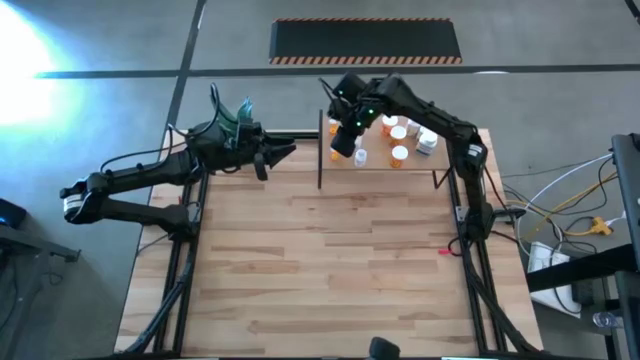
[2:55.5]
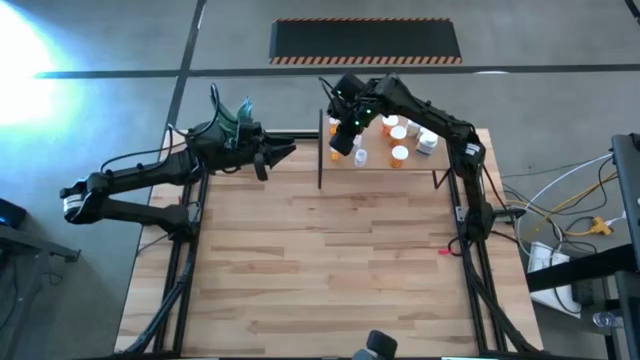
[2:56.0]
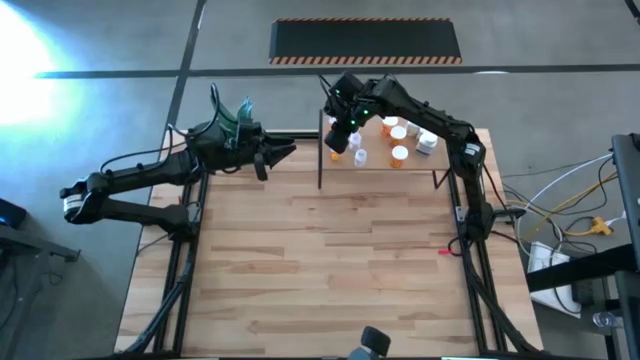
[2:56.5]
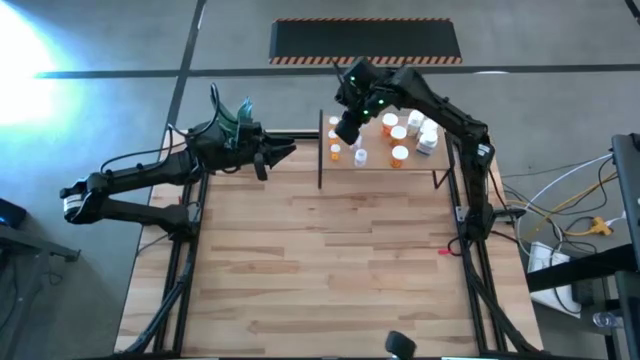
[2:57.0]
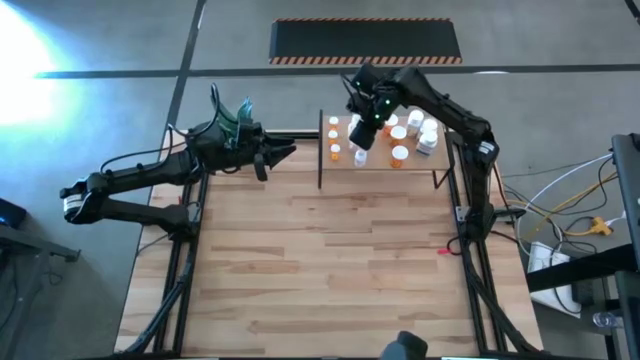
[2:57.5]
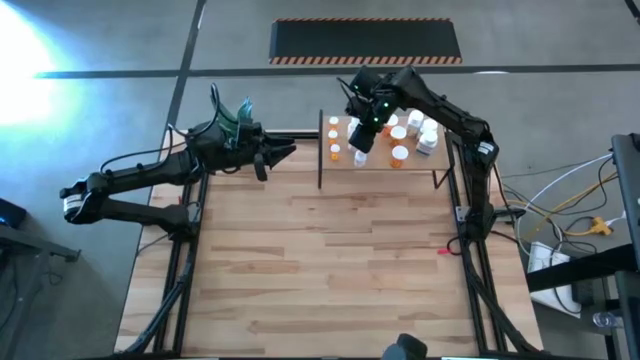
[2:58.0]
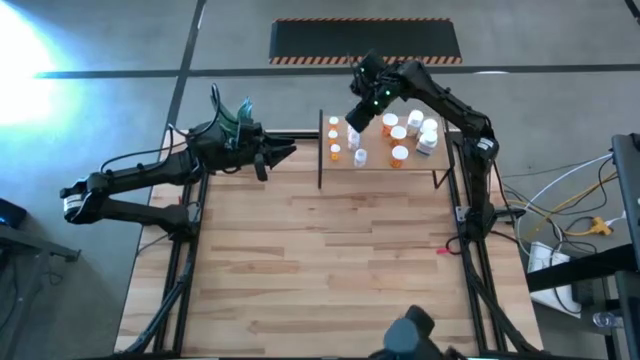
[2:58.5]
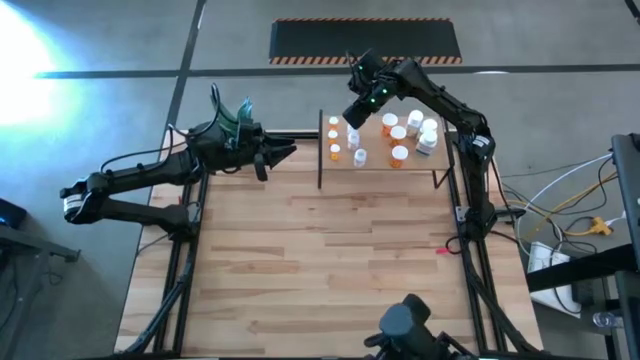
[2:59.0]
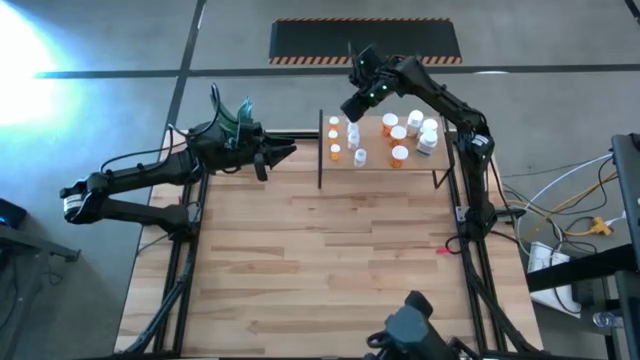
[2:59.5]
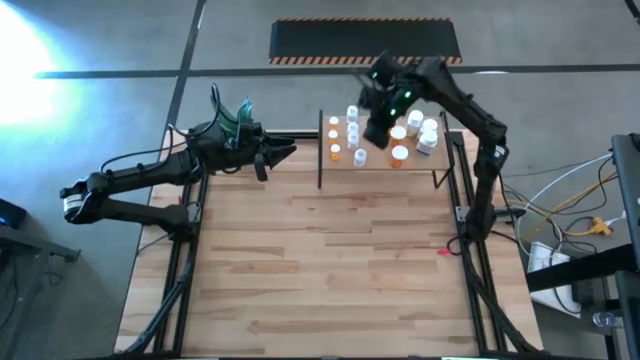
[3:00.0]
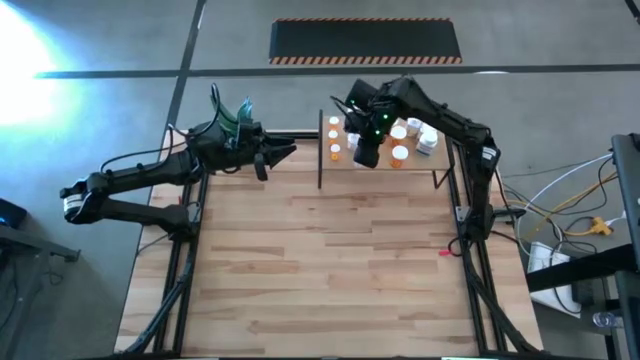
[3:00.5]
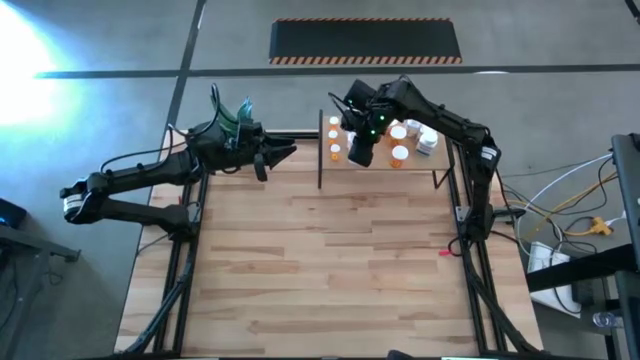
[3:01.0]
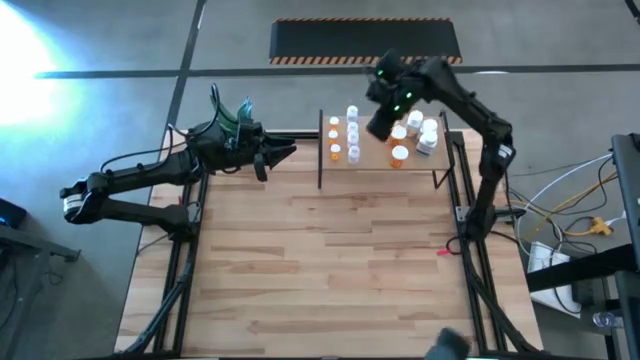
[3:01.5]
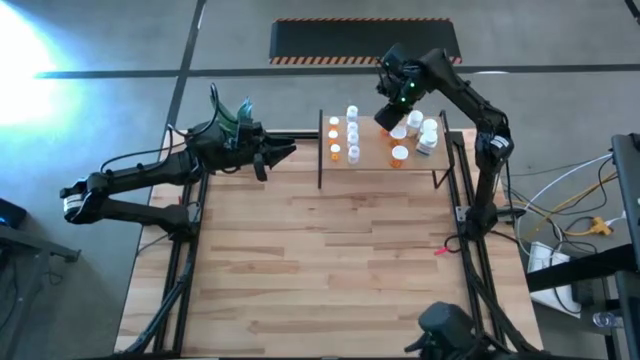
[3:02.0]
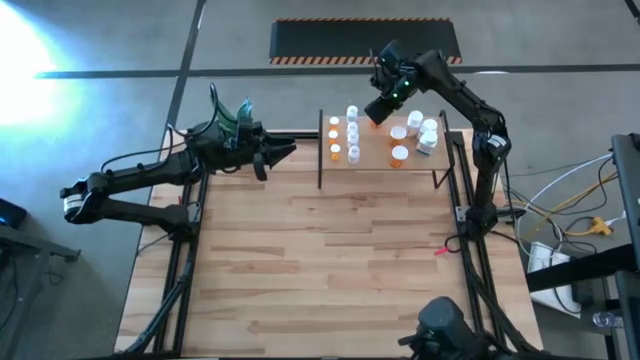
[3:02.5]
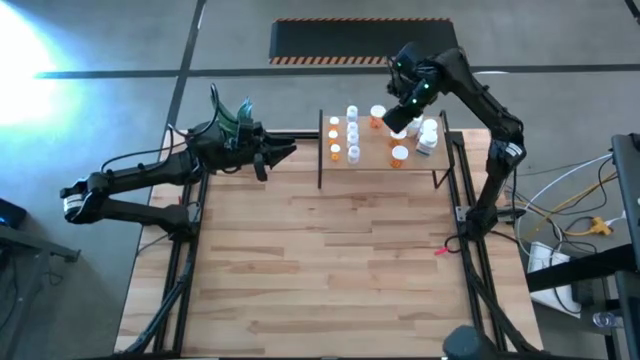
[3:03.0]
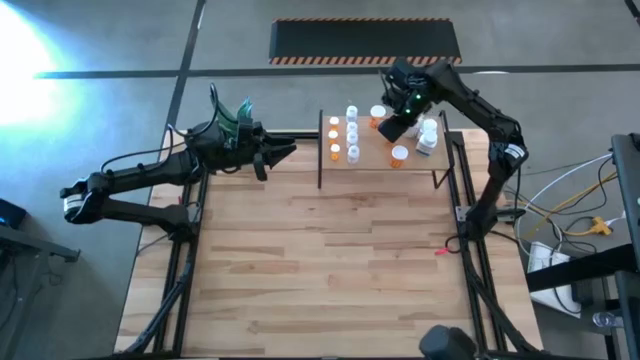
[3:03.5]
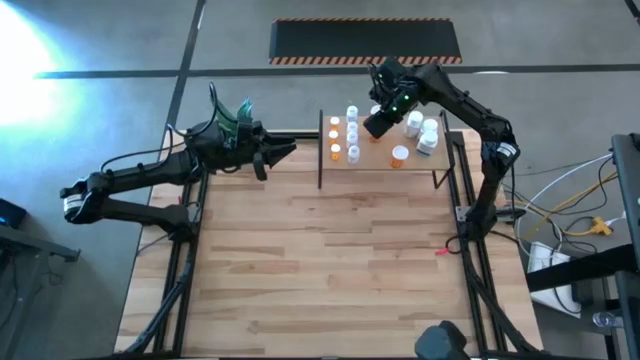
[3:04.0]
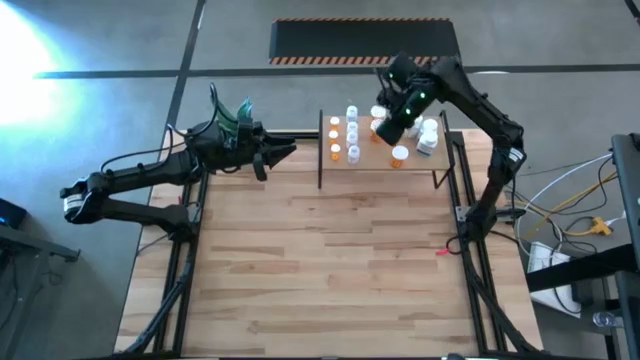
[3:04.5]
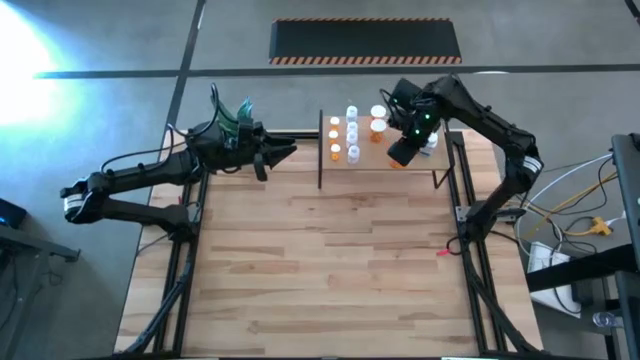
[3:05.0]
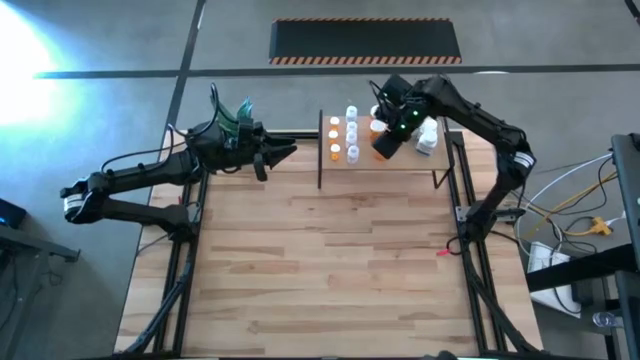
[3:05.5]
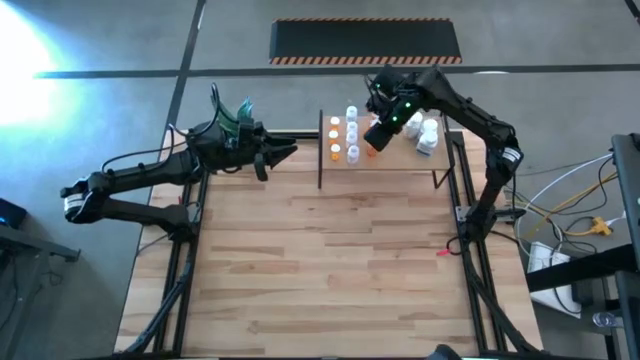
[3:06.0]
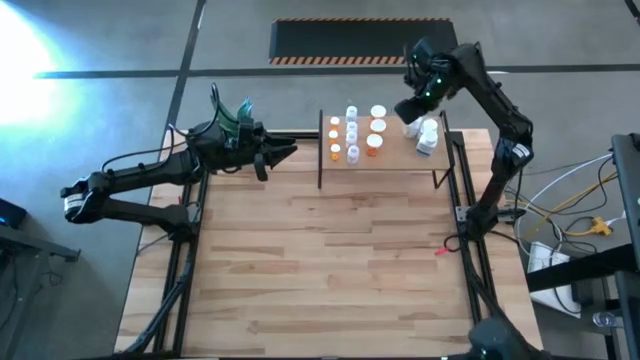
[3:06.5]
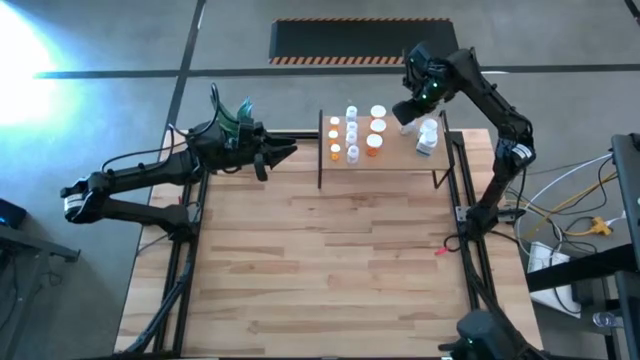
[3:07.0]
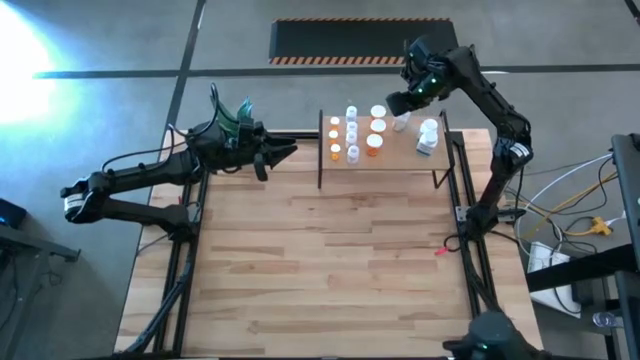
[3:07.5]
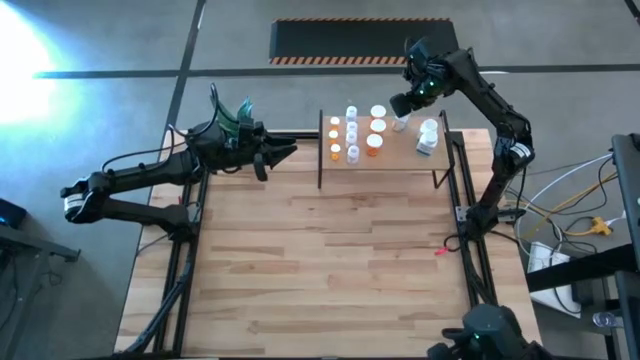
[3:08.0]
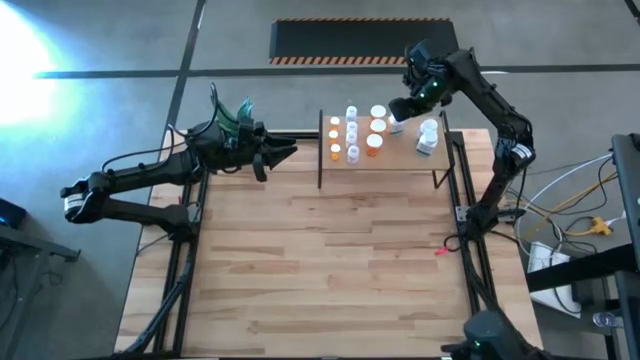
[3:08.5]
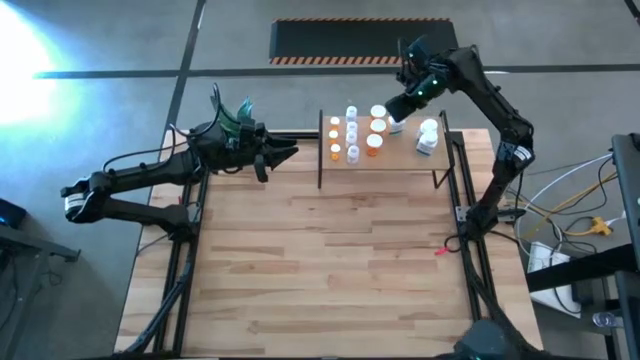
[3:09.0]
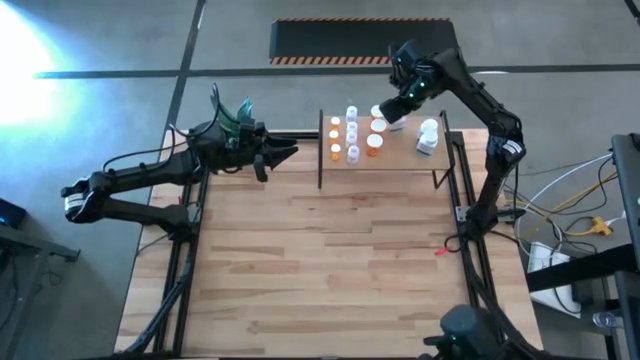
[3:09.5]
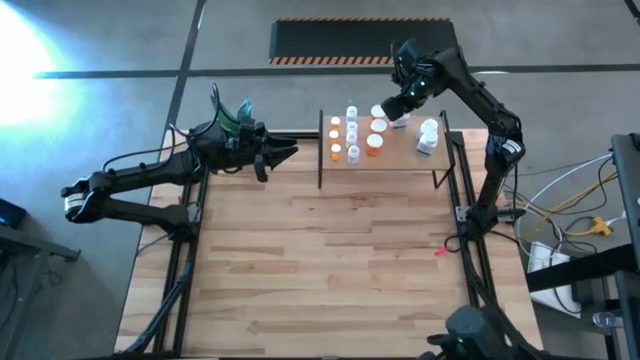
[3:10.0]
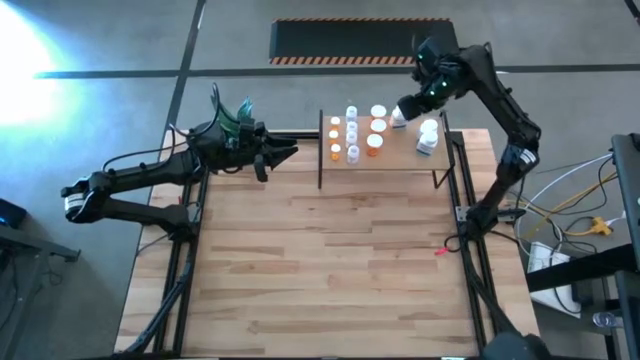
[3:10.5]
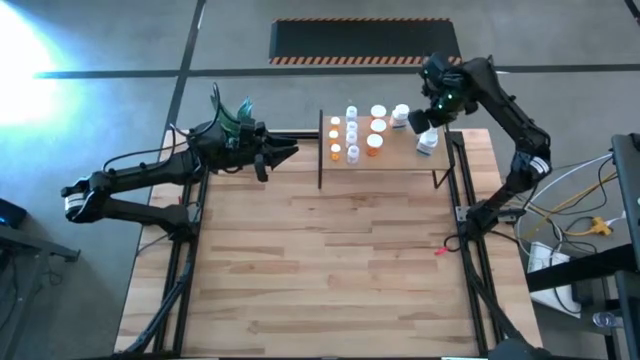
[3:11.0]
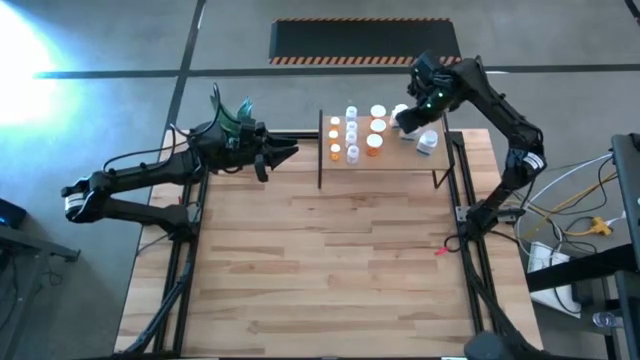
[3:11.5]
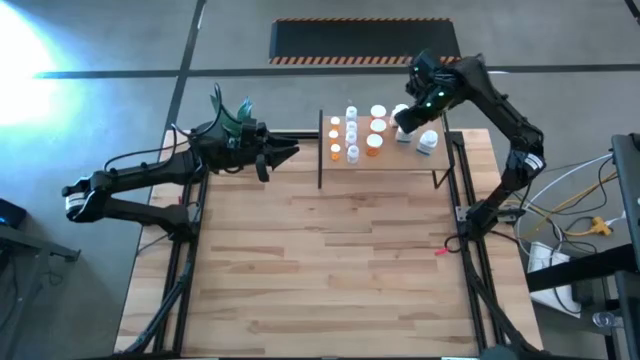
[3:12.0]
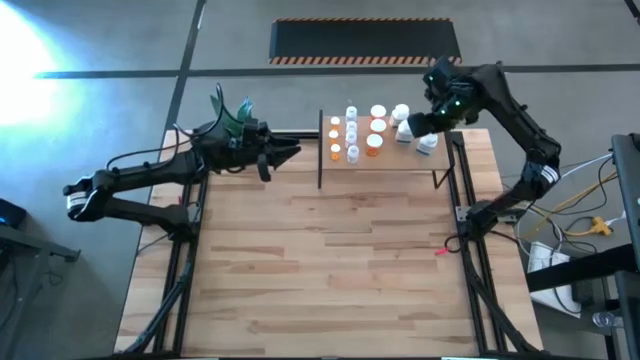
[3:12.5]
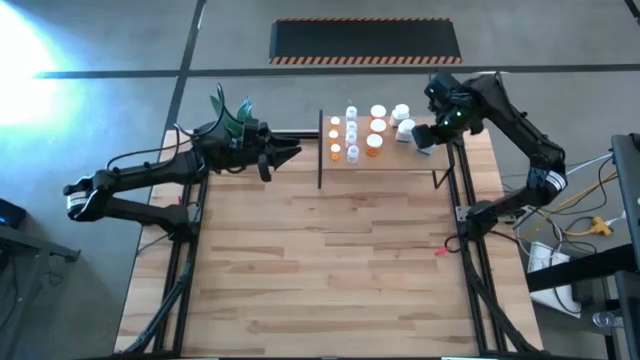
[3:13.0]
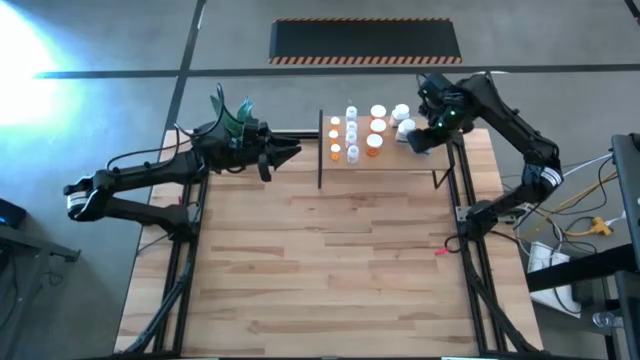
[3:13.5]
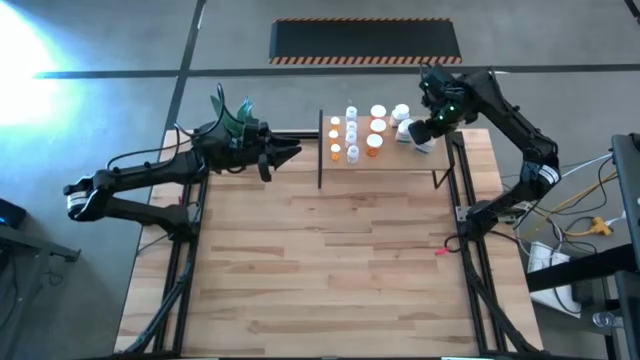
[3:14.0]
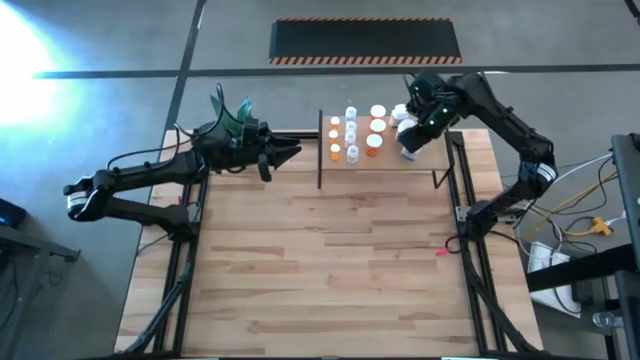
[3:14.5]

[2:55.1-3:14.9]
Task: Pick and place medicine bottles onto shelf by color
Adjust the pill bottles on the shelf

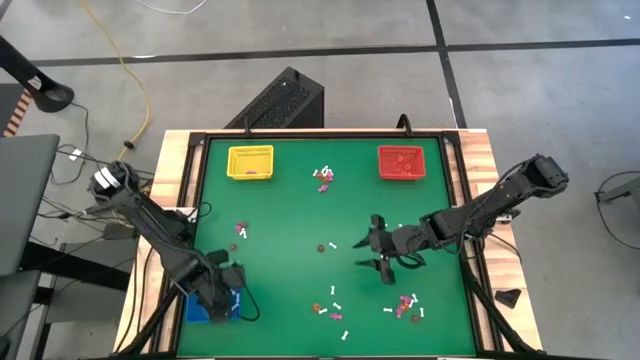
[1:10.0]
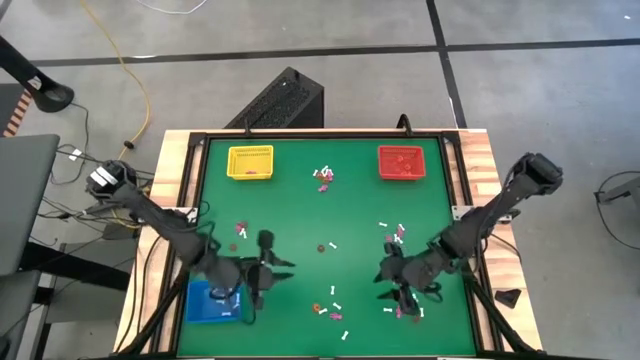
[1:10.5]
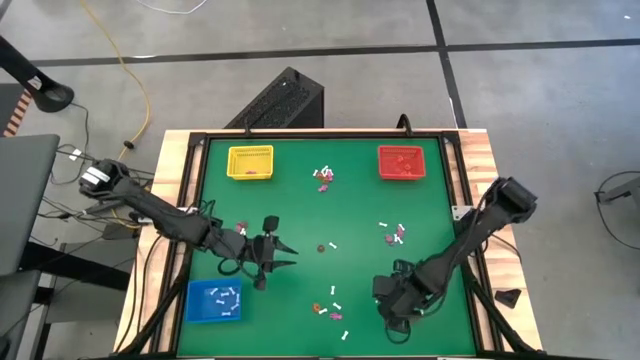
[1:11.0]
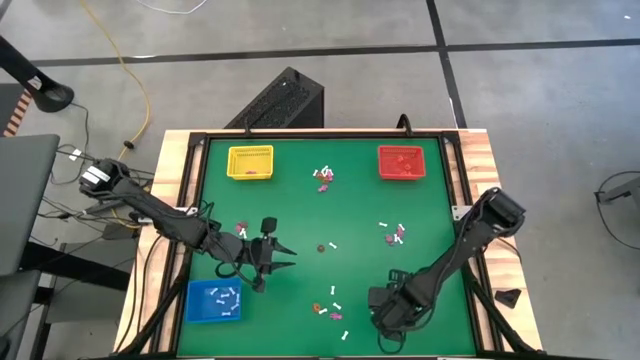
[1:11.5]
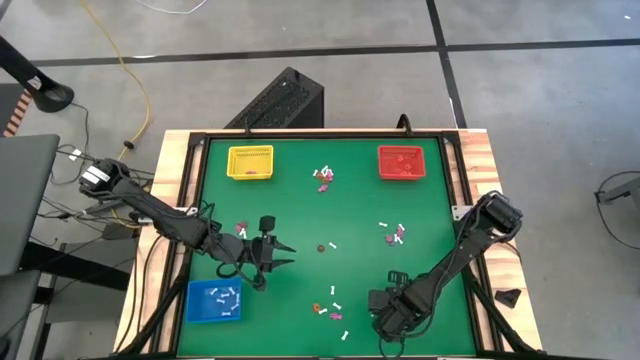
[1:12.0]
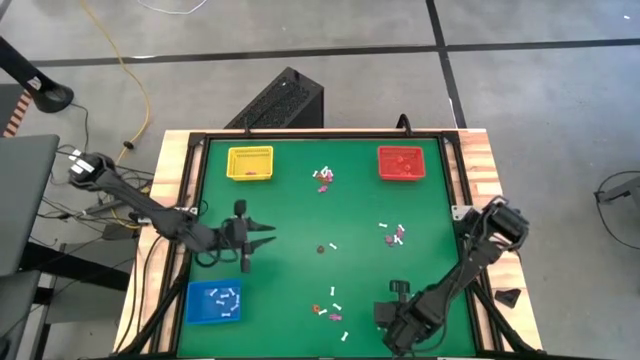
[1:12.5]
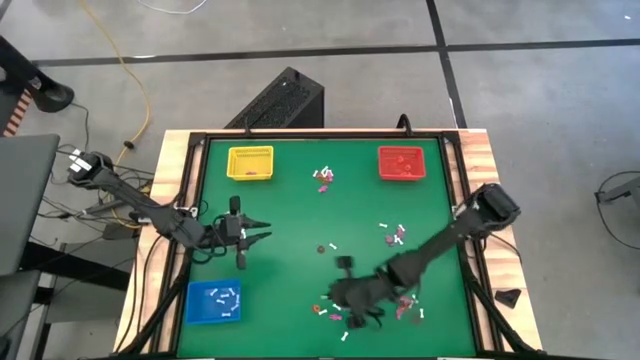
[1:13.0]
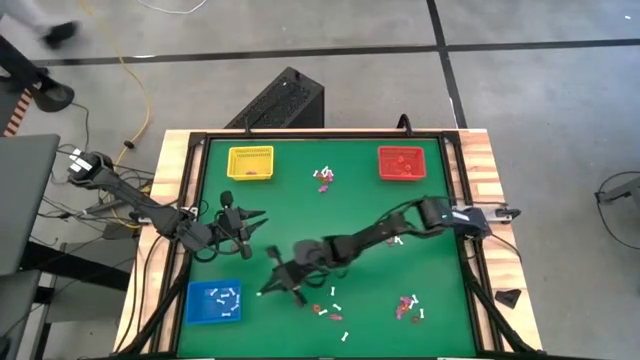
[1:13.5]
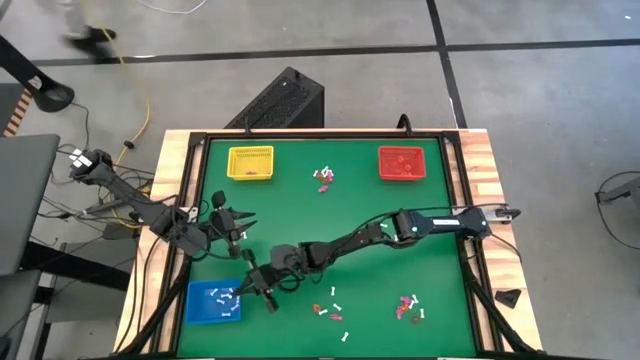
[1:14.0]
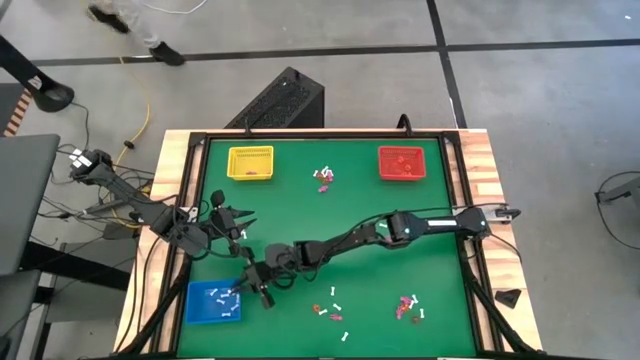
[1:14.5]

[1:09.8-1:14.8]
Task: Sort Halloween decoration
Put the white bone toy into the blue bin
